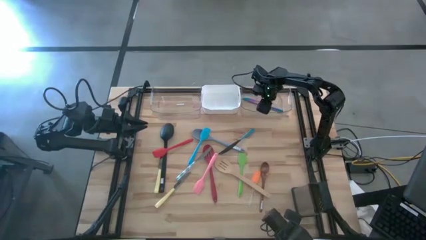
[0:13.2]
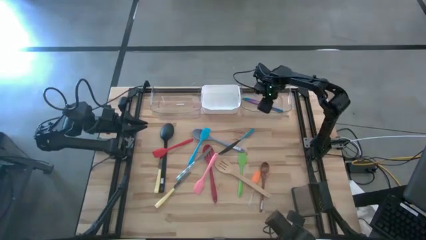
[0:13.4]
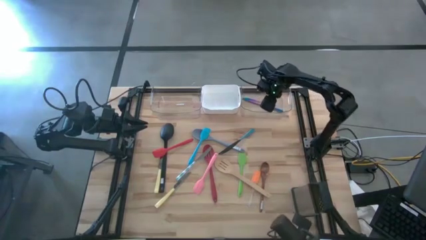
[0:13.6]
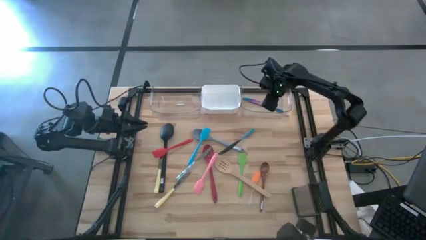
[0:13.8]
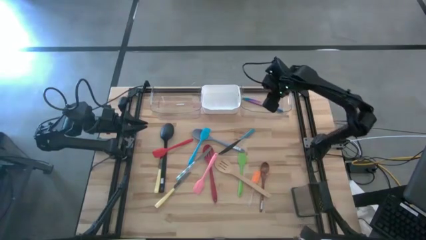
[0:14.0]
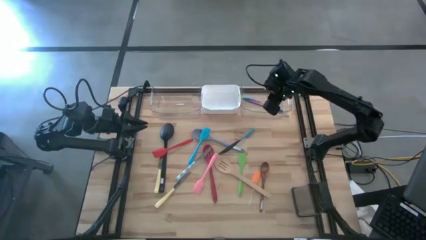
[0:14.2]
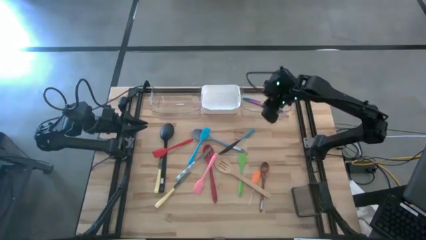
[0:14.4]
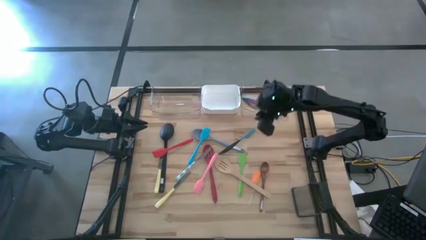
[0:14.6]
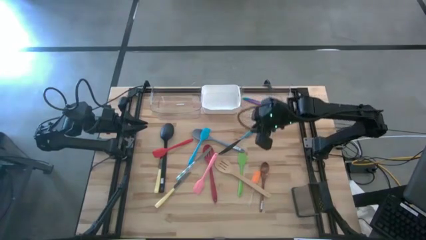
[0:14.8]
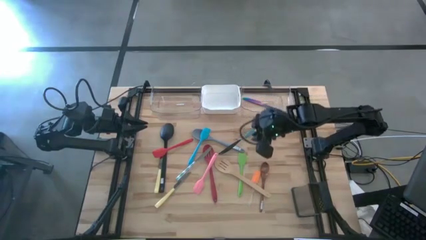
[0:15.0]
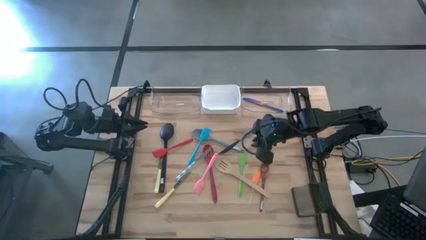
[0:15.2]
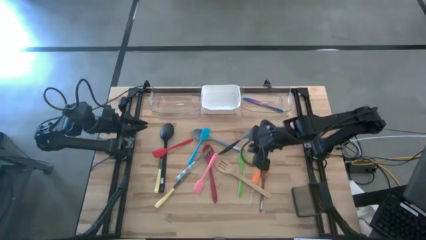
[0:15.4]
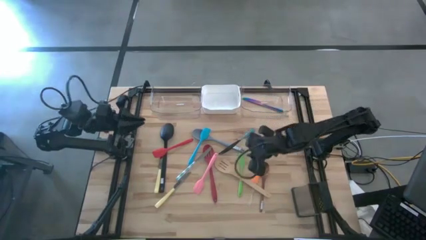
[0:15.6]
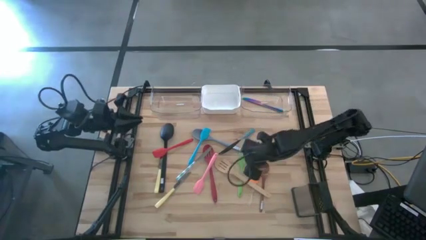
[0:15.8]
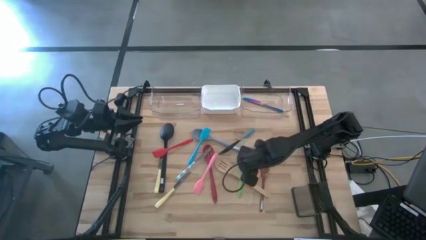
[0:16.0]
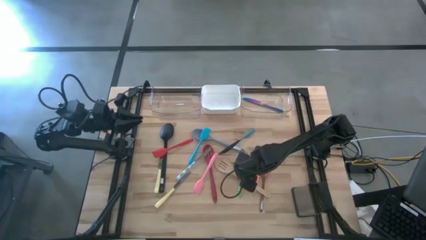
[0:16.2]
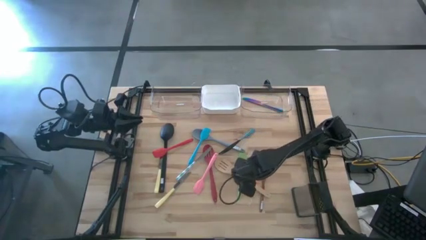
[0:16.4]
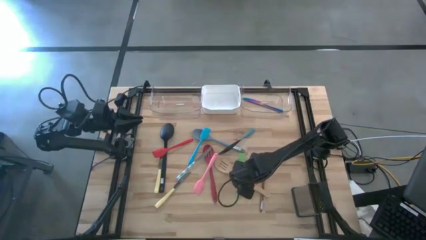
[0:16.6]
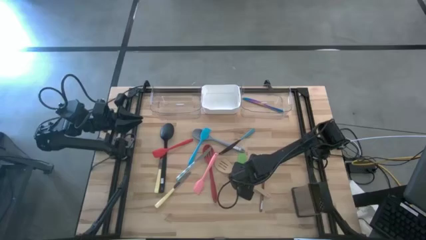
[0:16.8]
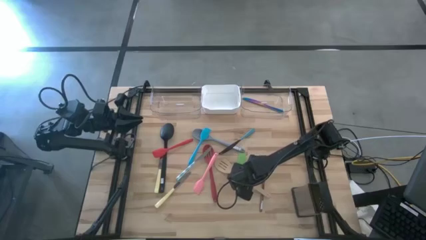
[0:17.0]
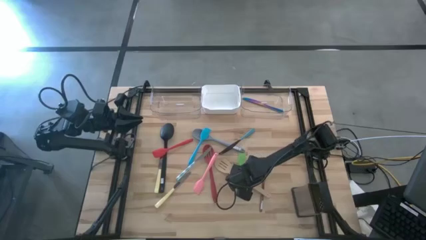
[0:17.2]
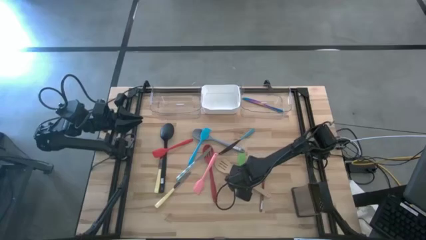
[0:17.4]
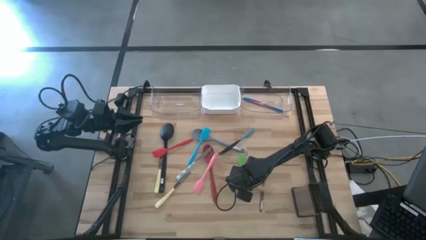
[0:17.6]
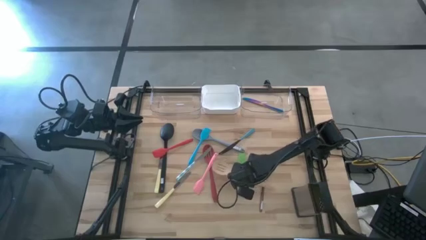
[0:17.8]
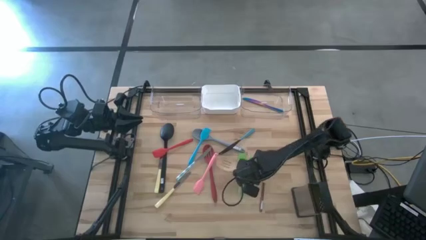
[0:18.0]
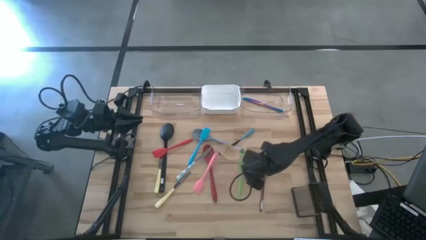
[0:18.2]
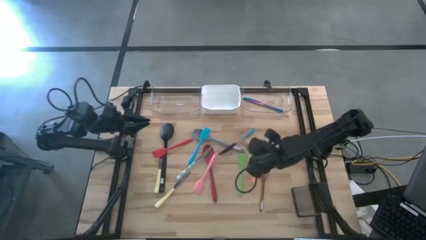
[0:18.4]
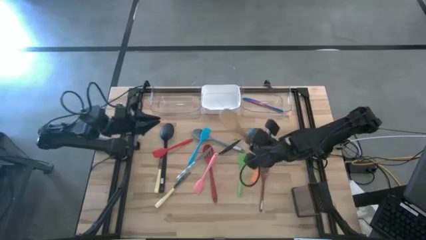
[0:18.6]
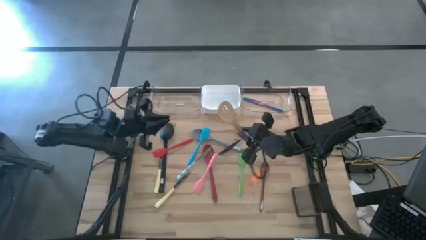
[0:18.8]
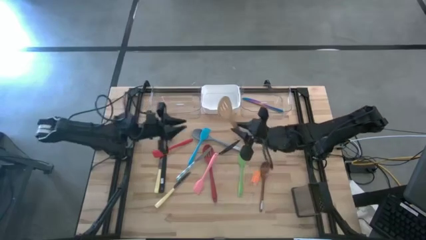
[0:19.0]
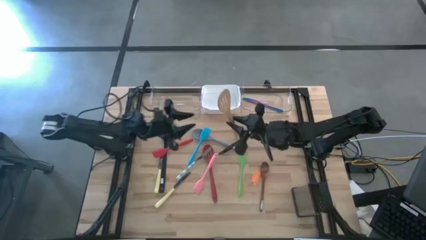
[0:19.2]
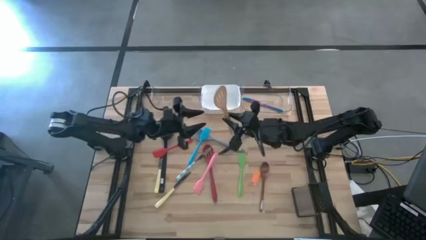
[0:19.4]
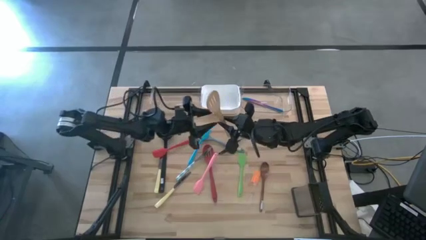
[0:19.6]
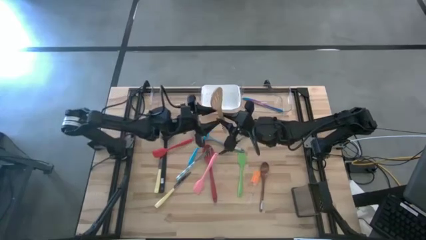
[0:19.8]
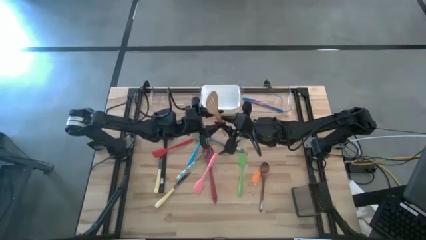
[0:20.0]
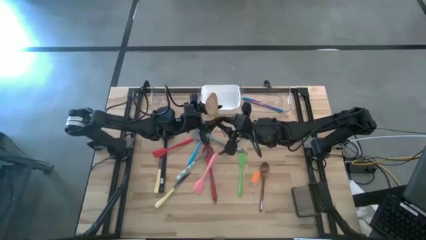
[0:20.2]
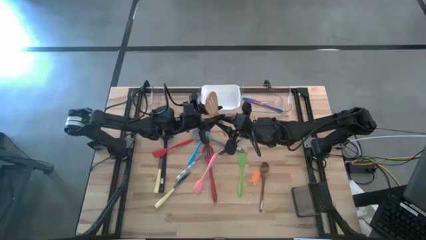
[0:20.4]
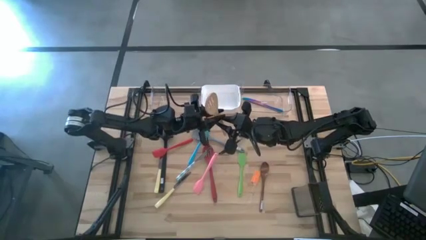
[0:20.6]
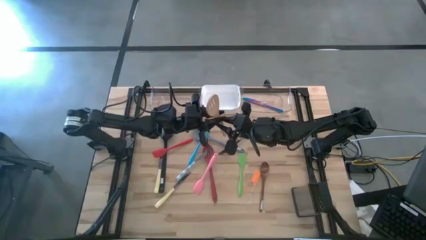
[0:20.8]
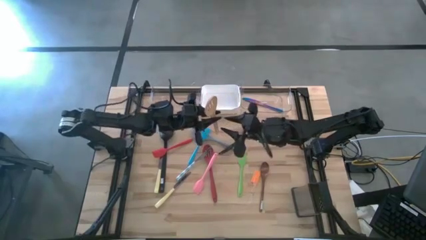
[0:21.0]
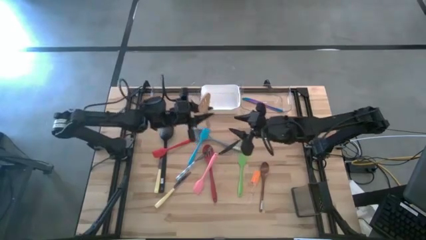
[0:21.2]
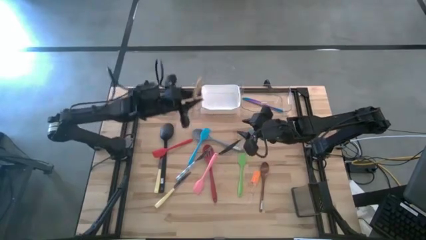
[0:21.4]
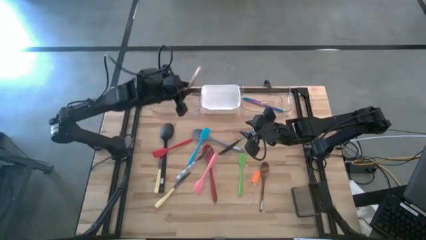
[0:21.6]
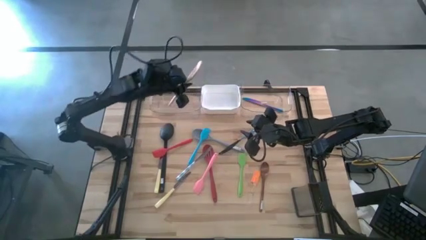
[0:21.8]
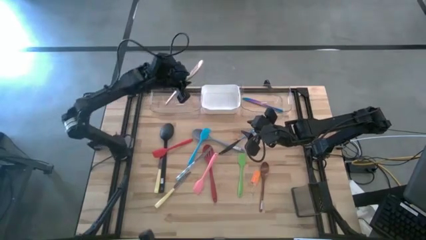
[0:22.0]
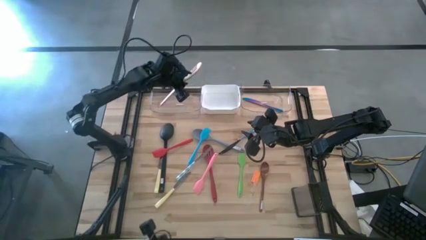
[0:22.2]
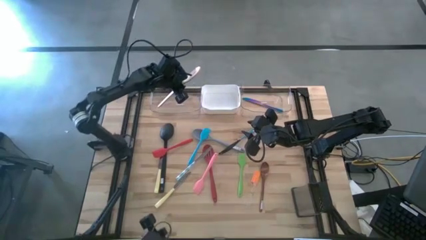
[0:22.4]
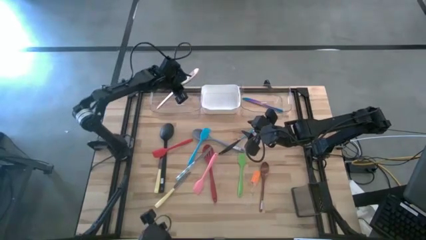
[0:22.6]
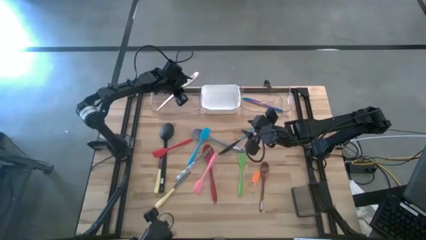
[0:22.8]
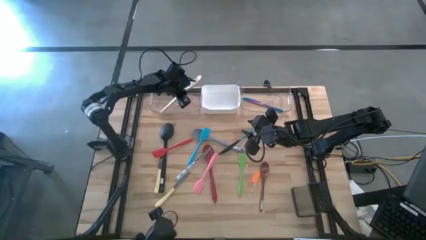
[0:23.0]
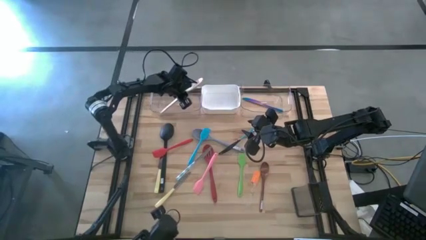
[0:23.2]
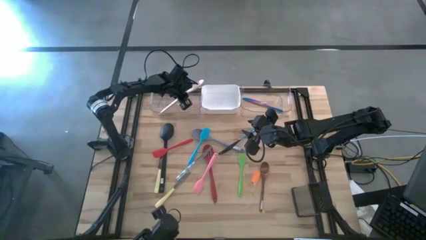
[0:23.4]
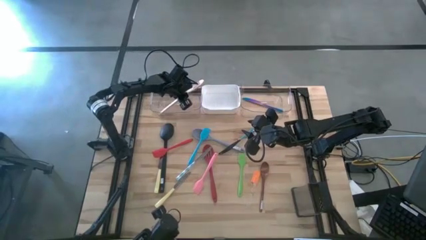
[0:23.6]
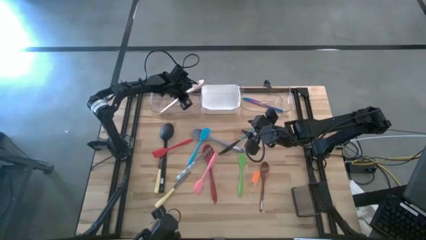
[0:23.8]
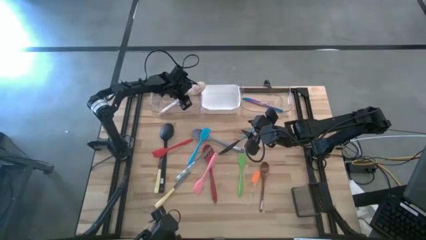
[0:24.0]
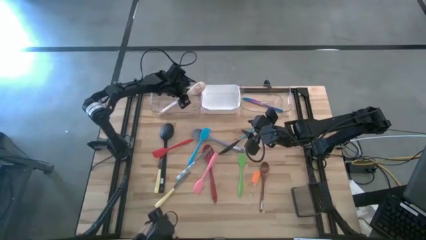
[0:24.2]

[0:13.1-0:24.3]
Task: Pick & Place Kitchen Items
Put the wooden cooking spoon into the left transparent bin
